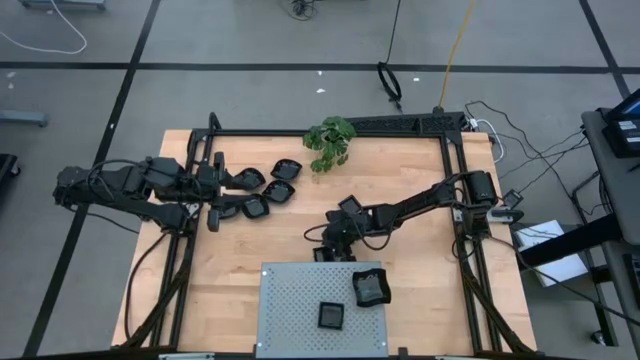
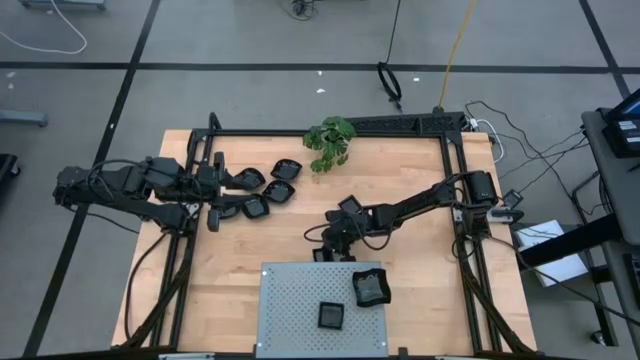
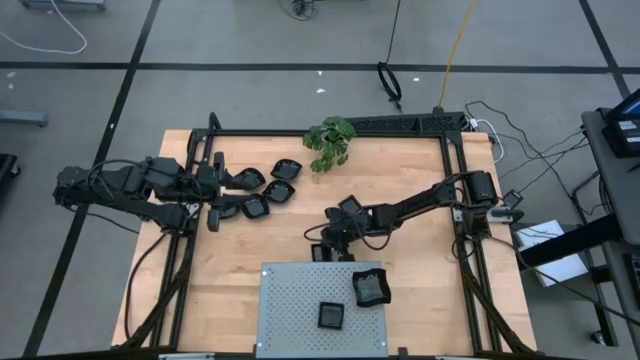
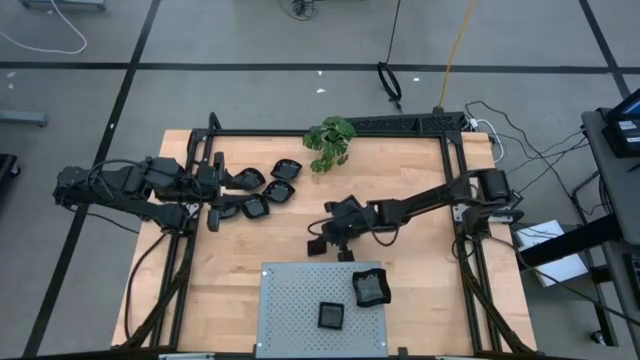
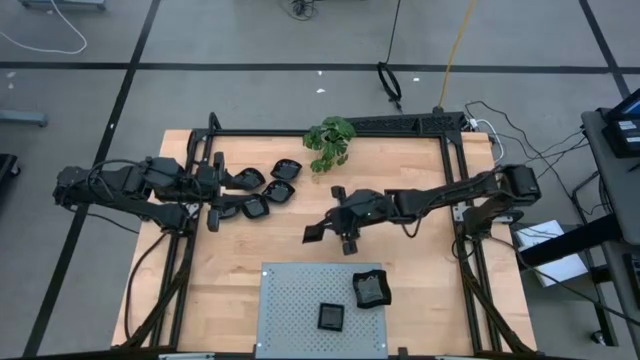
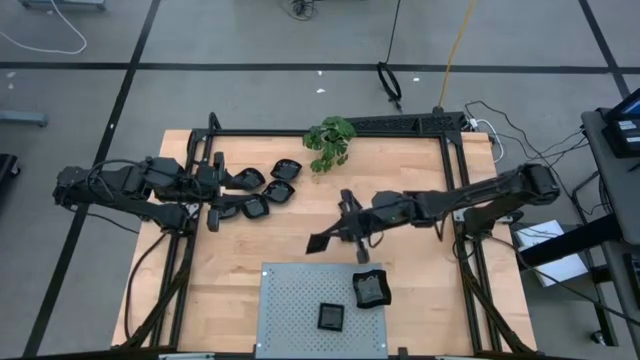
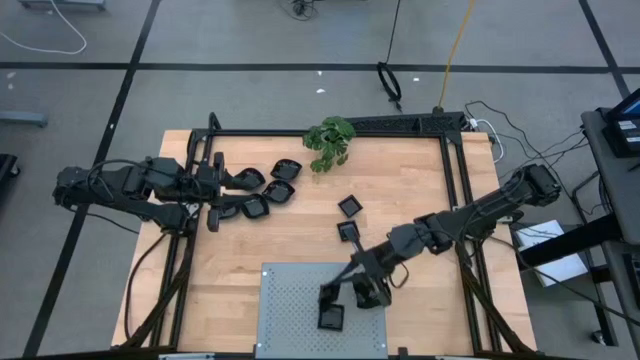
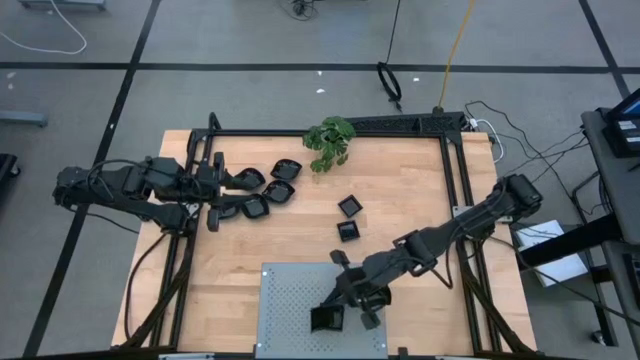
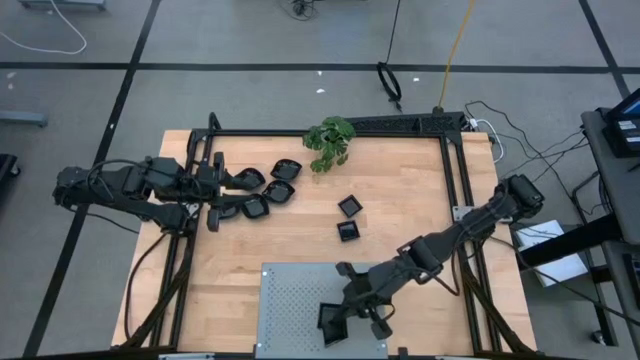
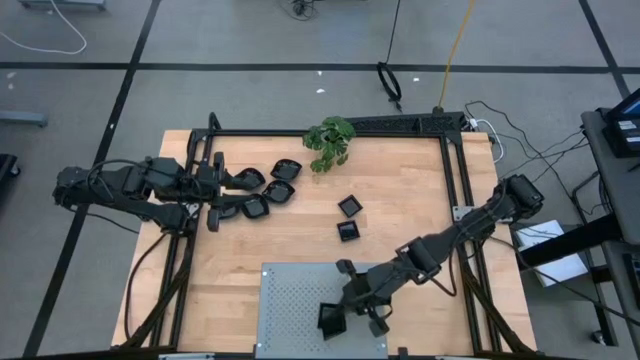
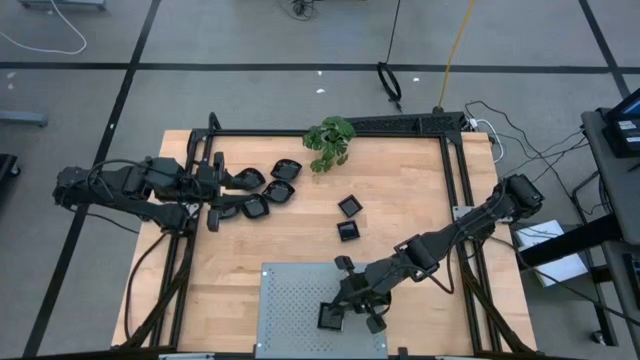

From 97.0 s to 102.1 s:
Task: Pick & Place Mini shaped plates
Stack the square plate onto the stacked square plate on the shelf

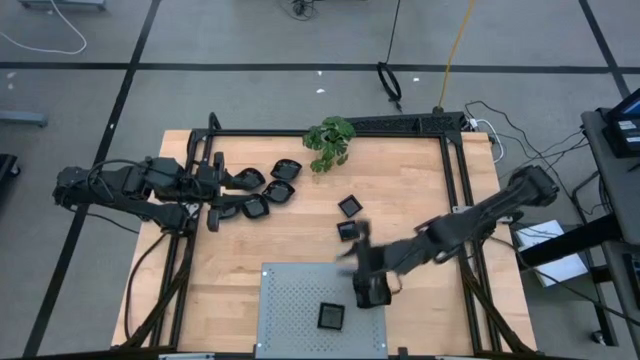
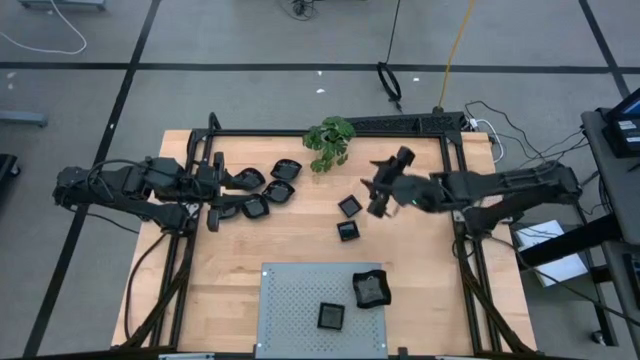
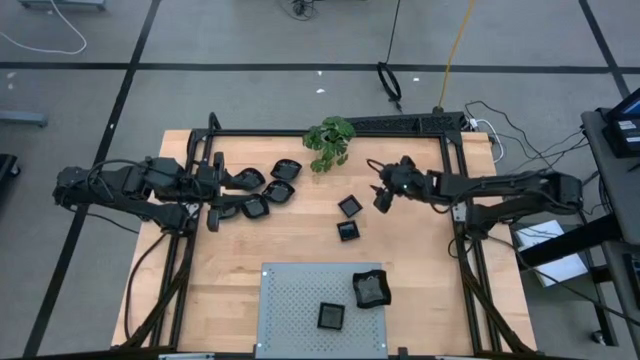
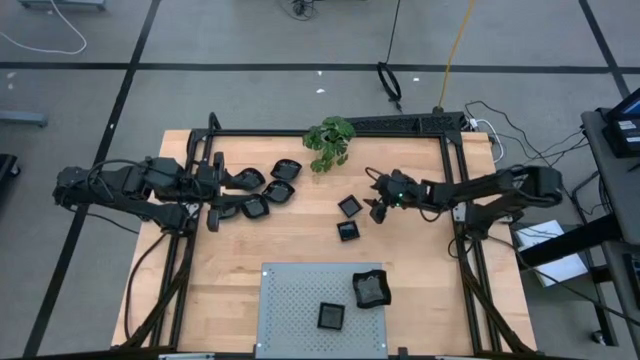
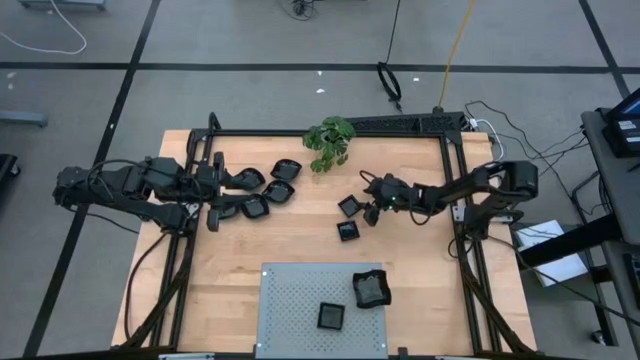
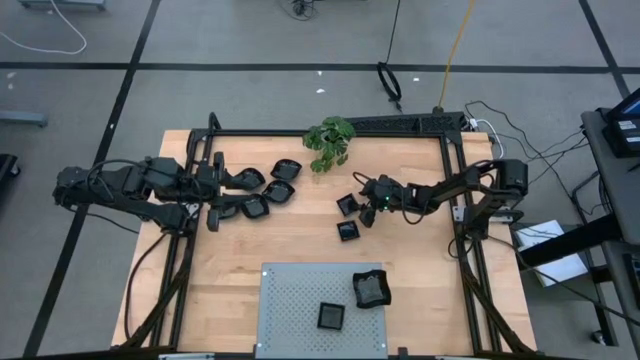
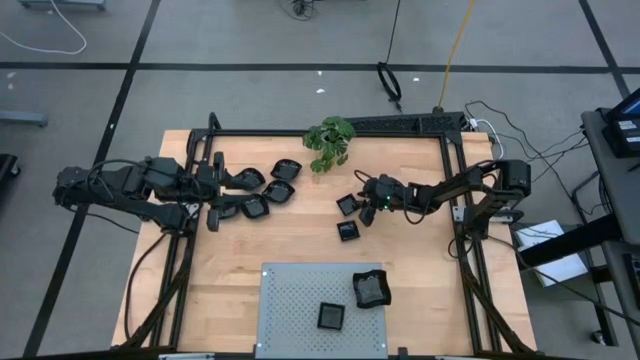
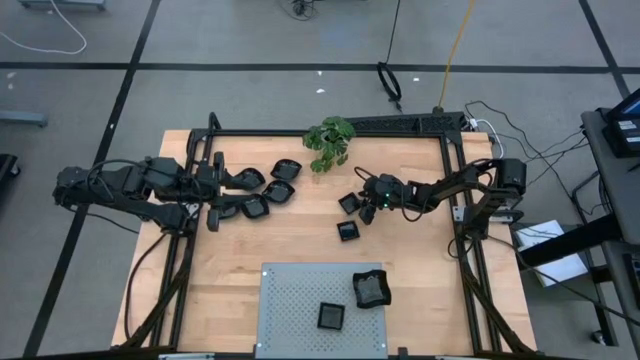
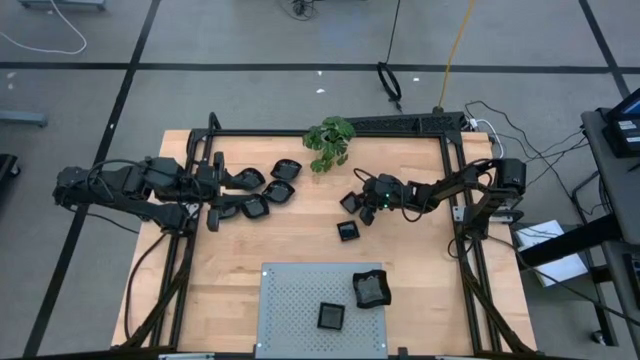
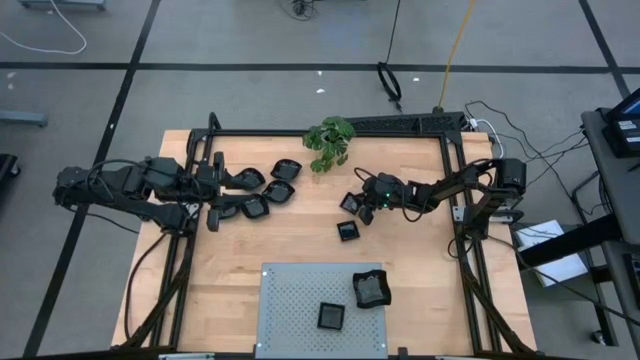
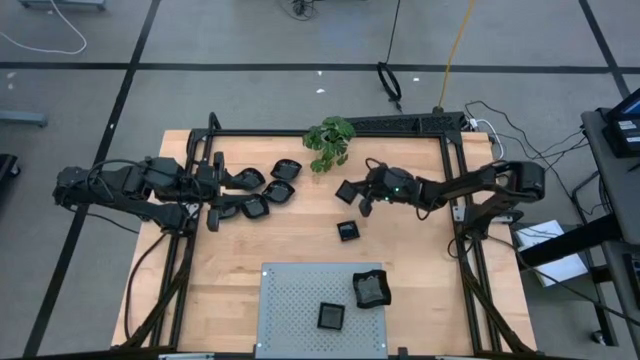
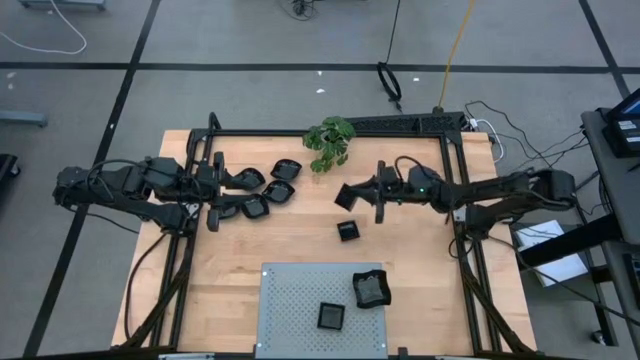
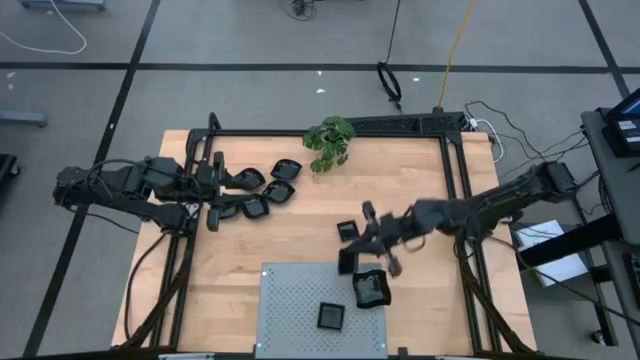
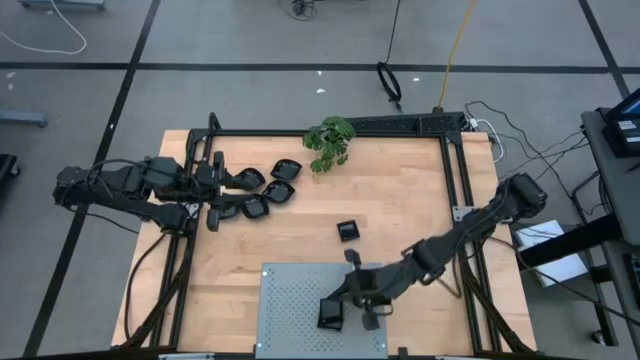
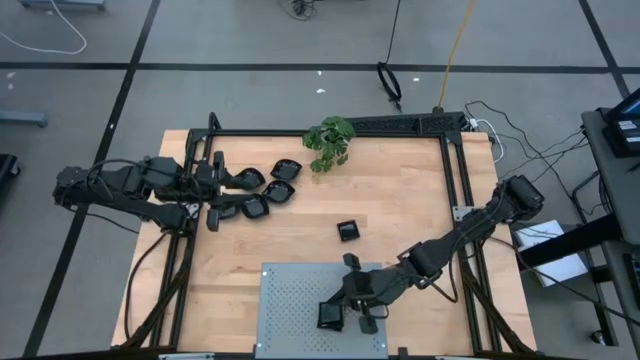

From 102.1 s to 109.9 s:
Stack the square plate onto the stacked square plate on the shelf

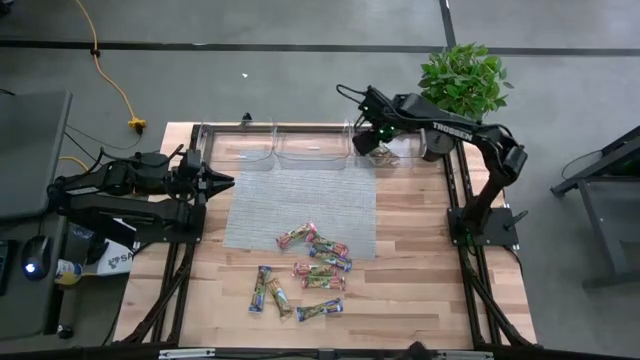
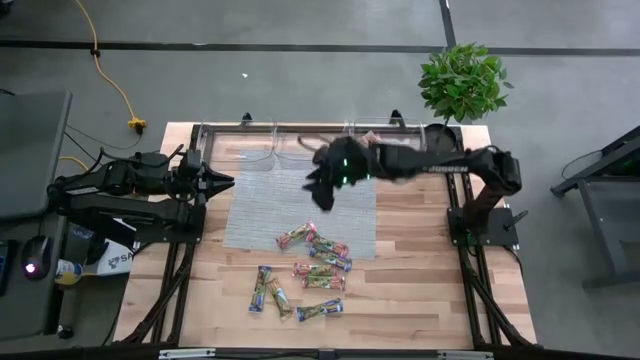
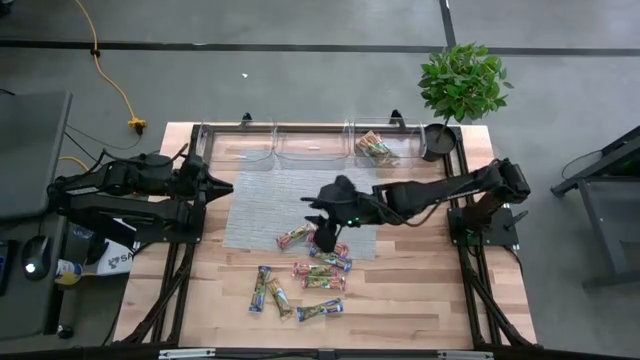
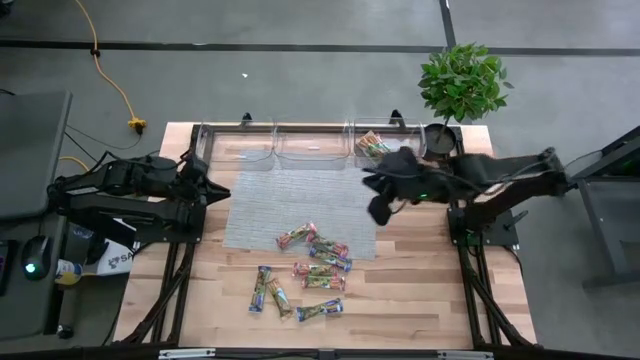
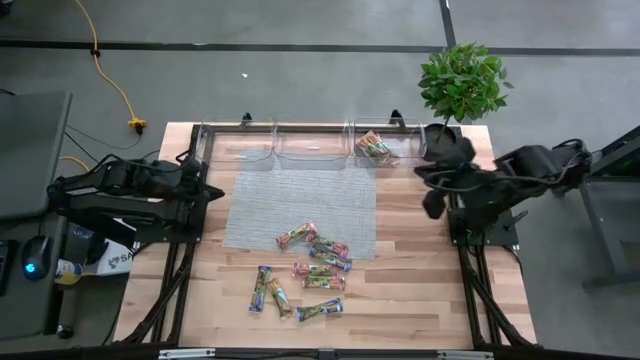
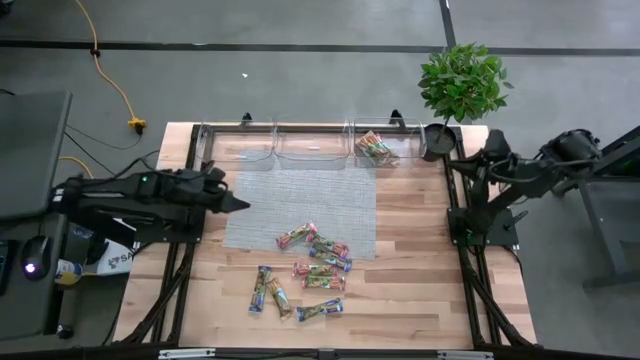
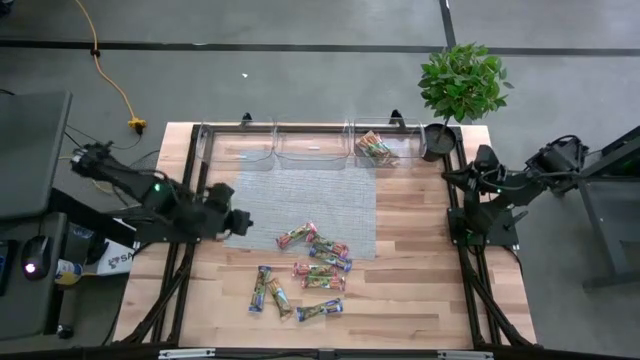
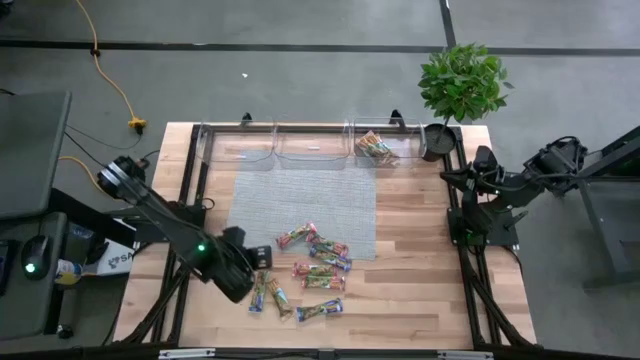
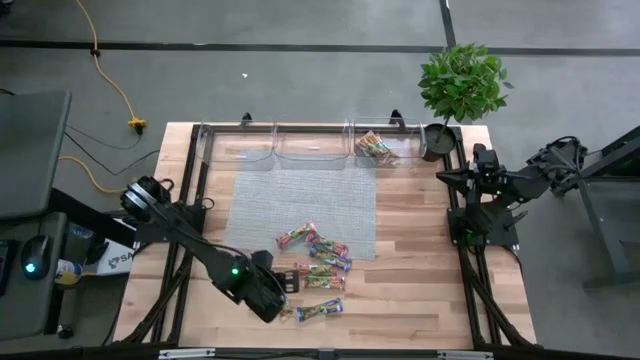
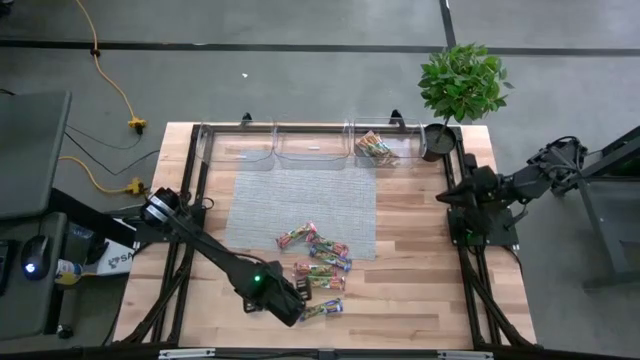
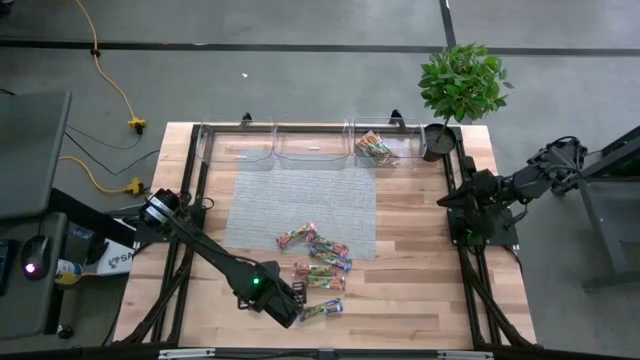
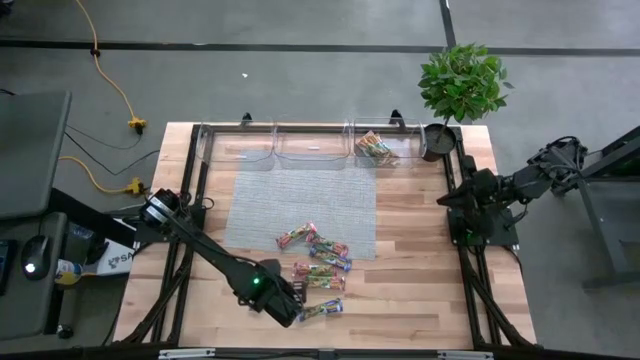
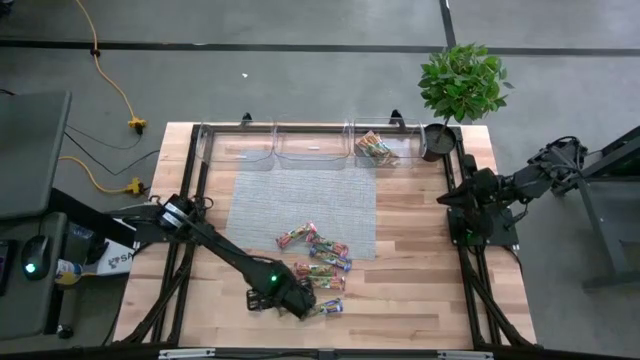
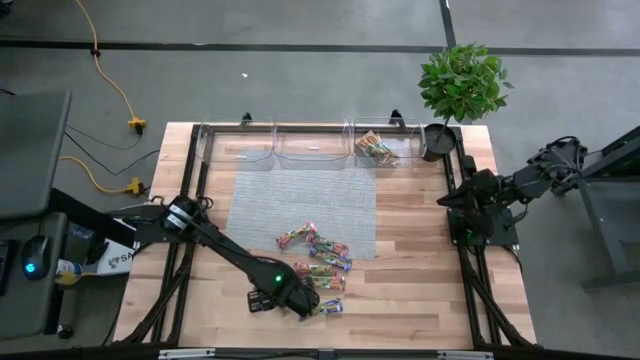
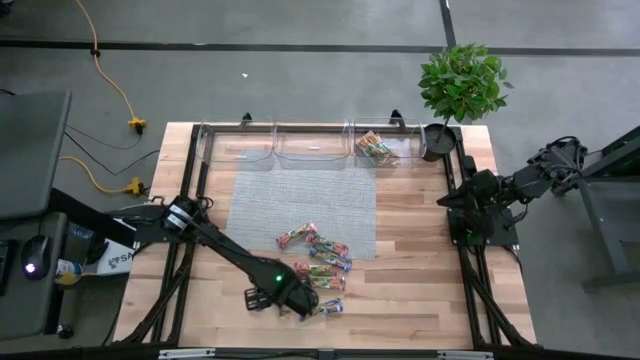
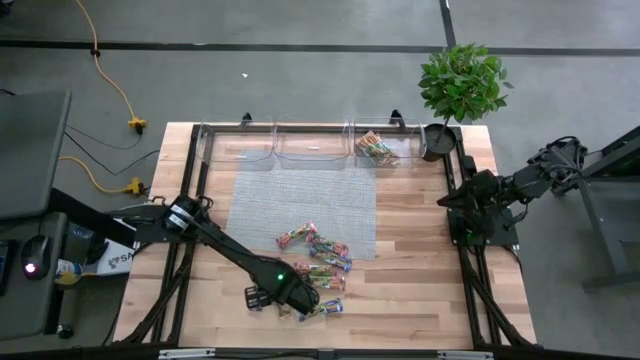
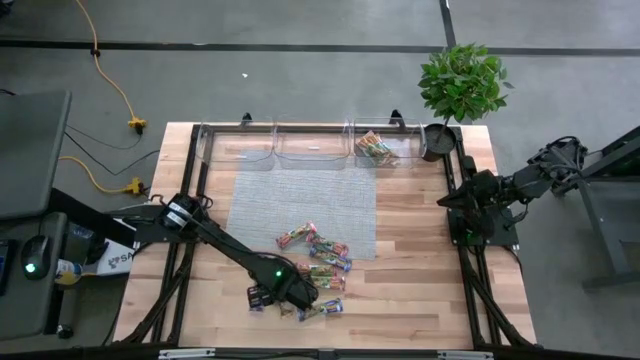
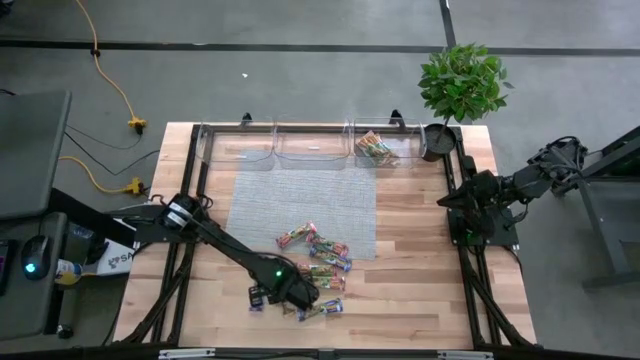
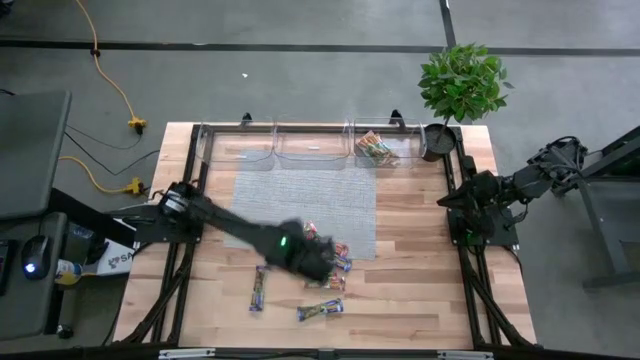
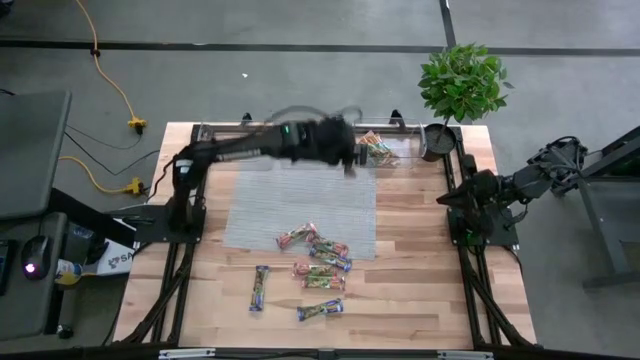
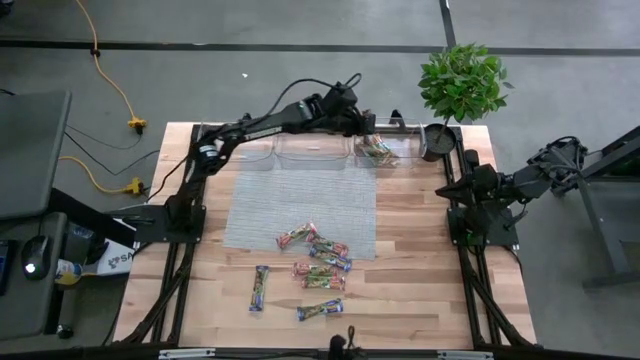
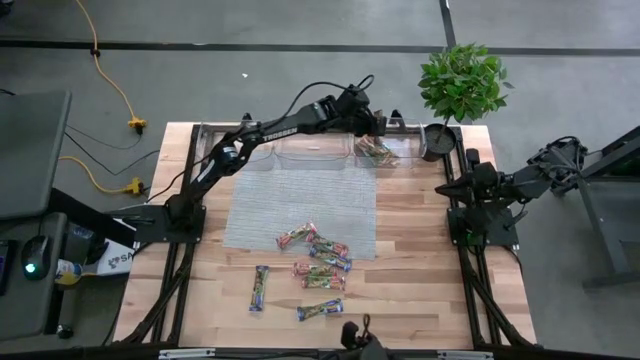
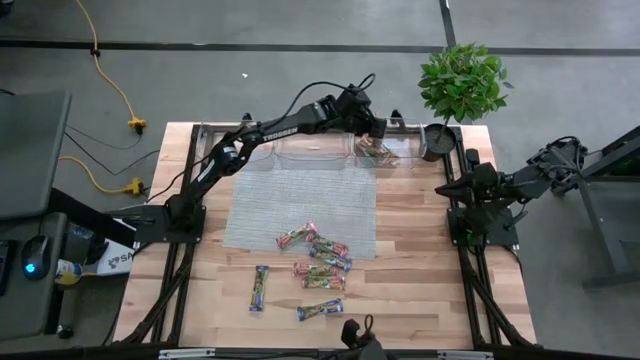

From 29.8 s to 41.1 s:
Task: Pick and place Granola Bars by type
Put the yellow granola bar into the right transparent bin
